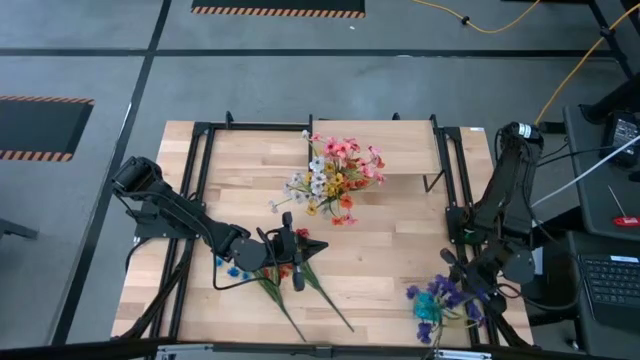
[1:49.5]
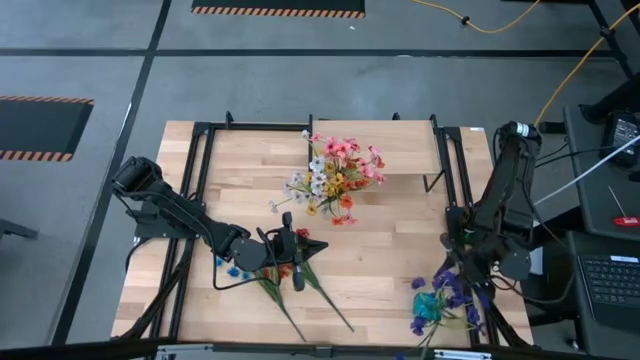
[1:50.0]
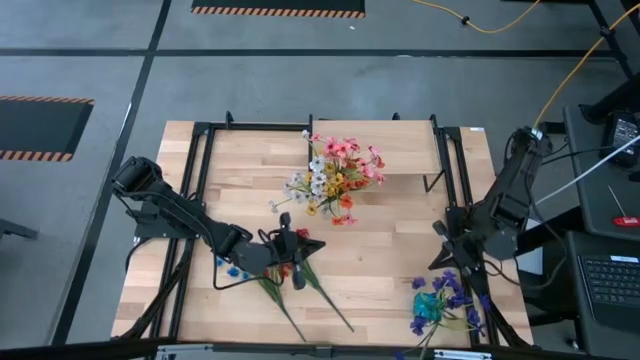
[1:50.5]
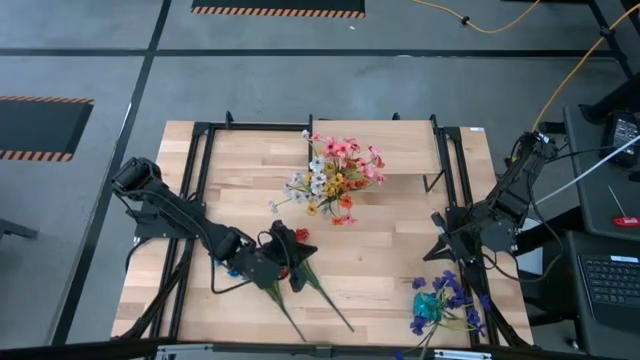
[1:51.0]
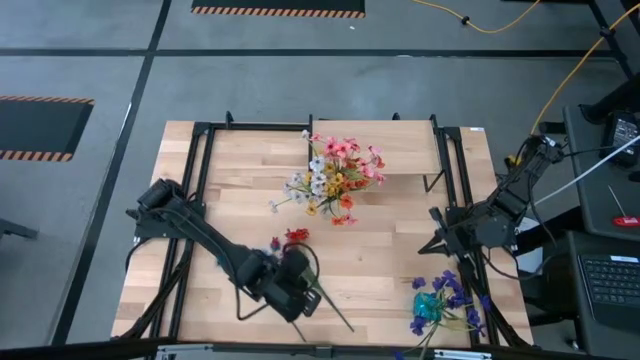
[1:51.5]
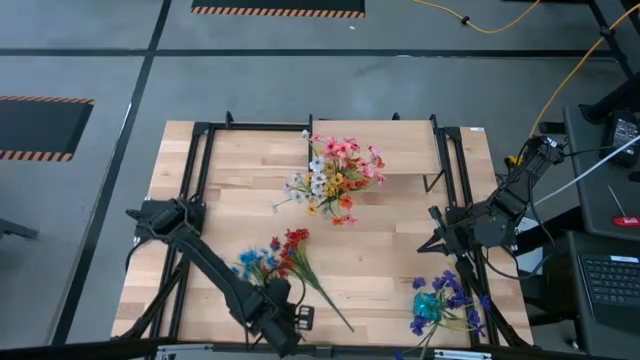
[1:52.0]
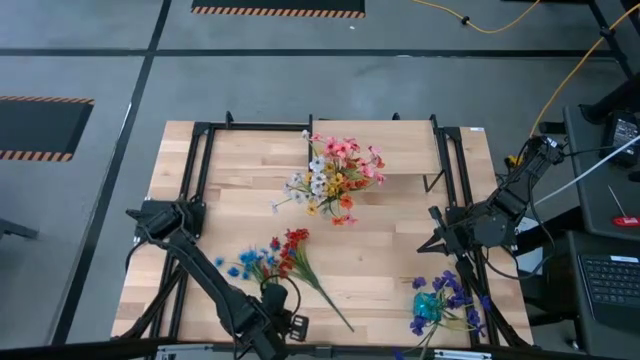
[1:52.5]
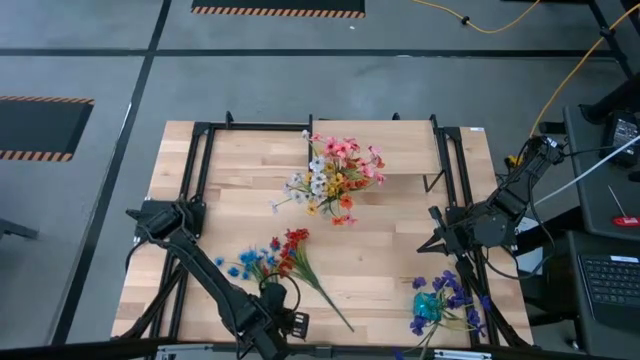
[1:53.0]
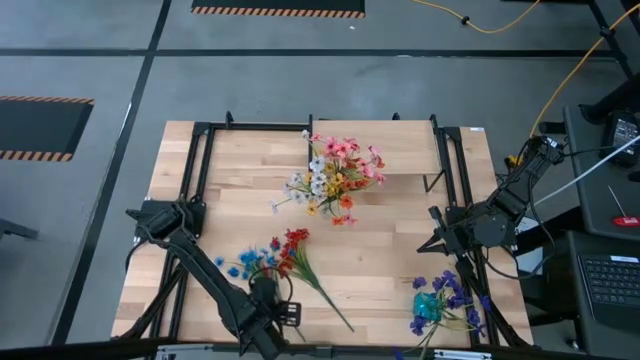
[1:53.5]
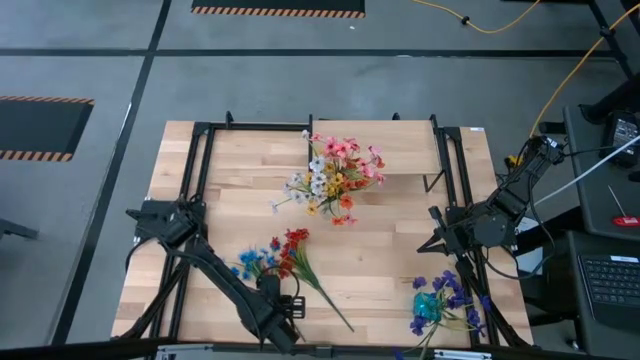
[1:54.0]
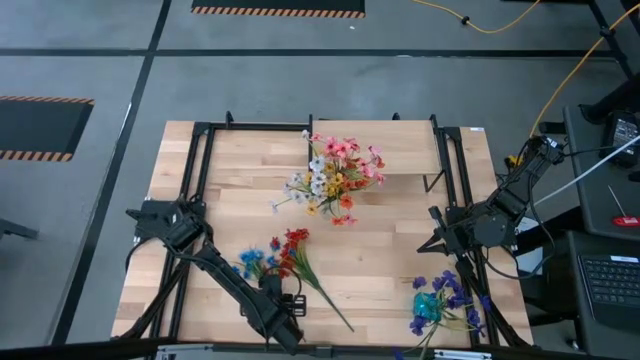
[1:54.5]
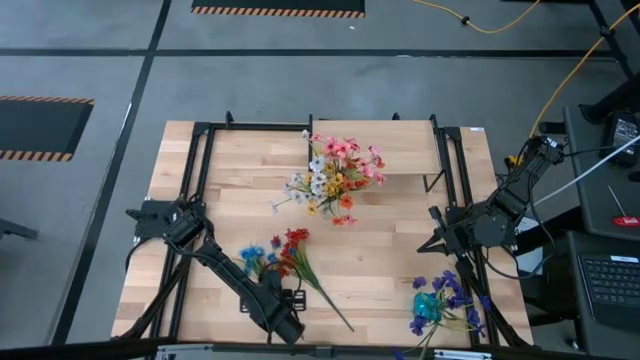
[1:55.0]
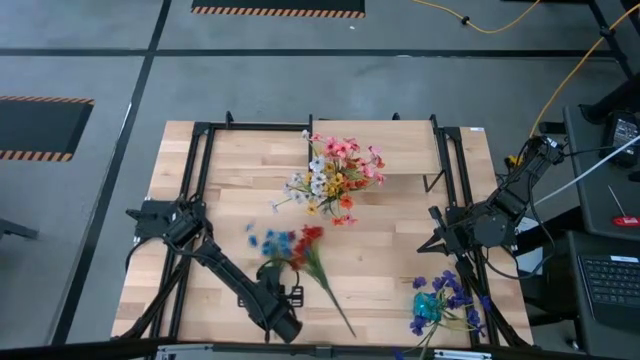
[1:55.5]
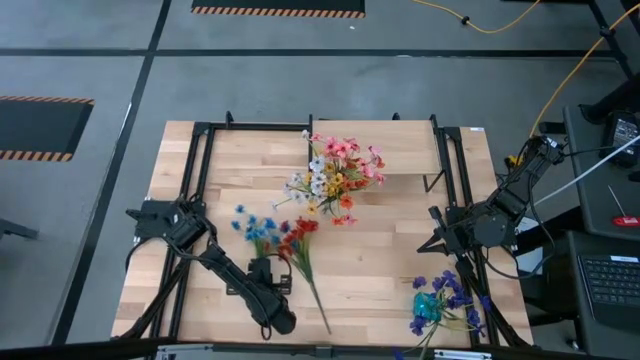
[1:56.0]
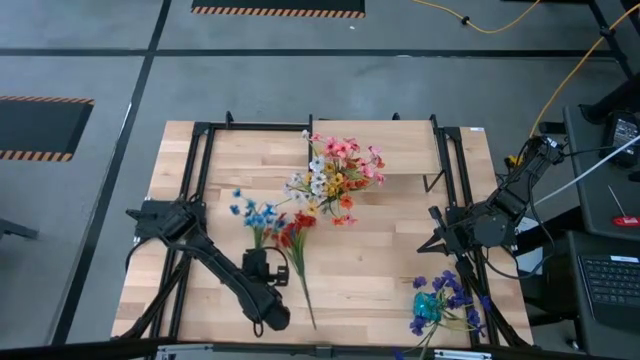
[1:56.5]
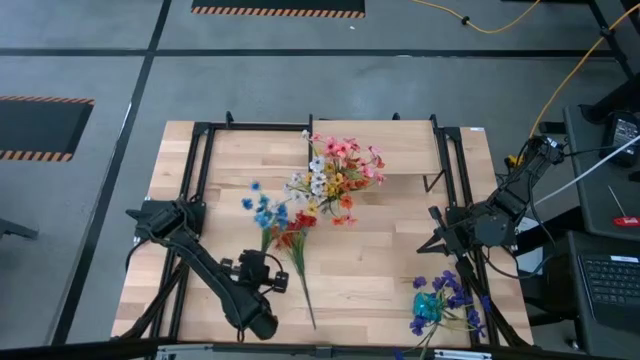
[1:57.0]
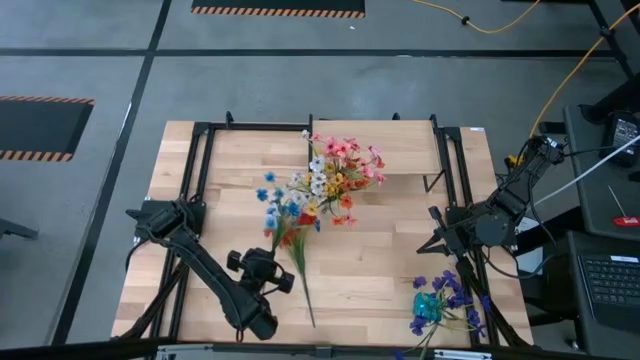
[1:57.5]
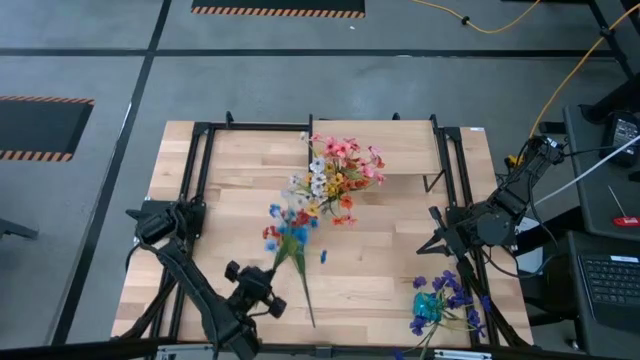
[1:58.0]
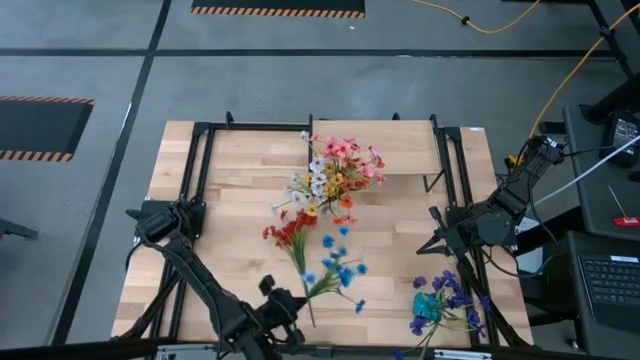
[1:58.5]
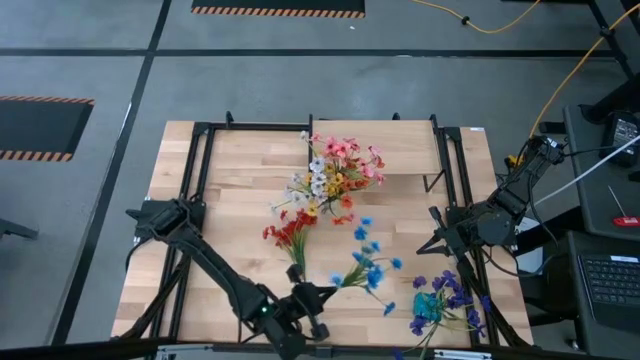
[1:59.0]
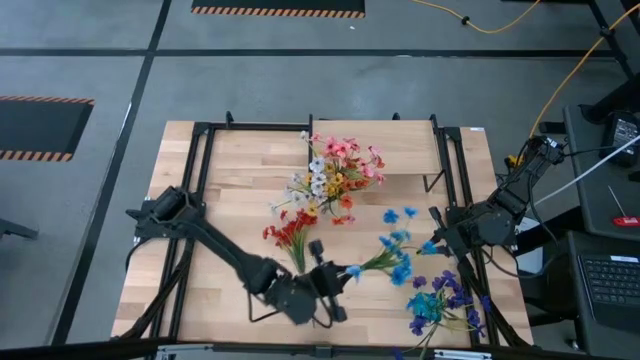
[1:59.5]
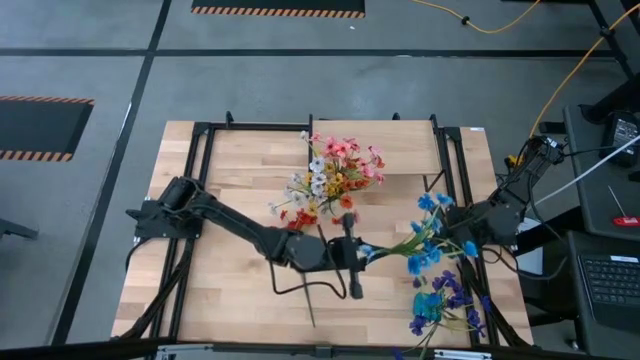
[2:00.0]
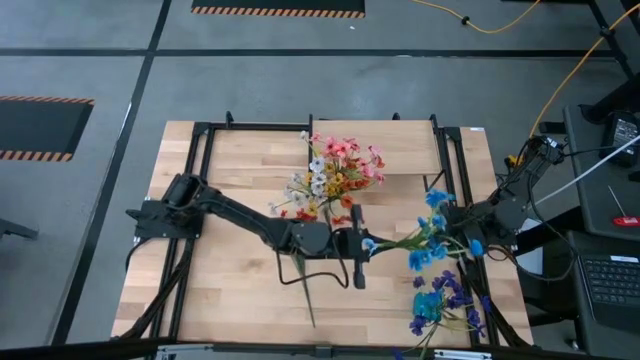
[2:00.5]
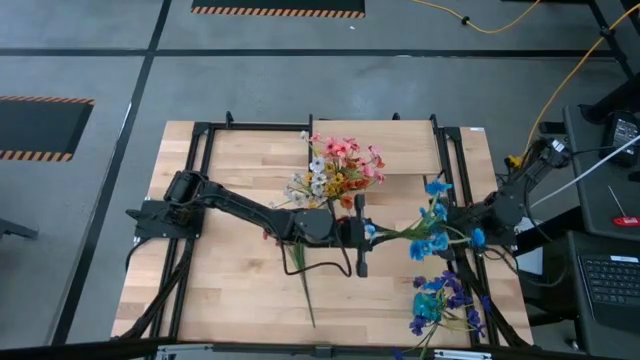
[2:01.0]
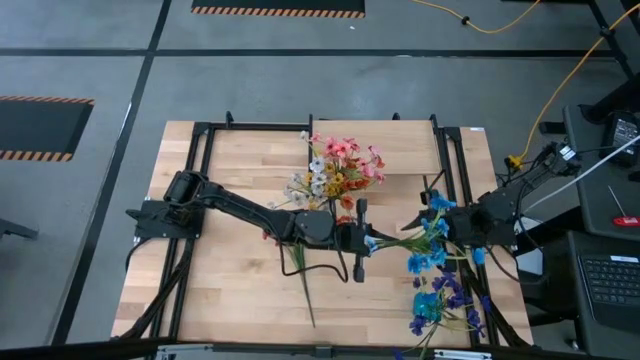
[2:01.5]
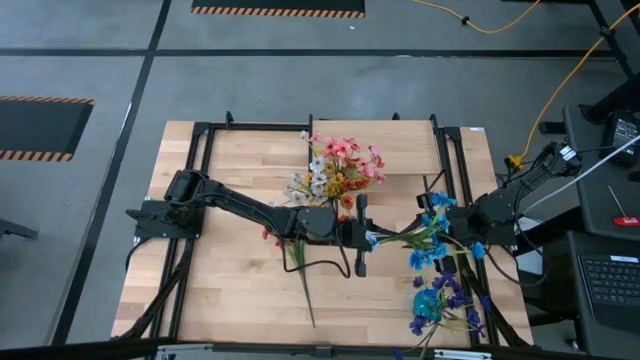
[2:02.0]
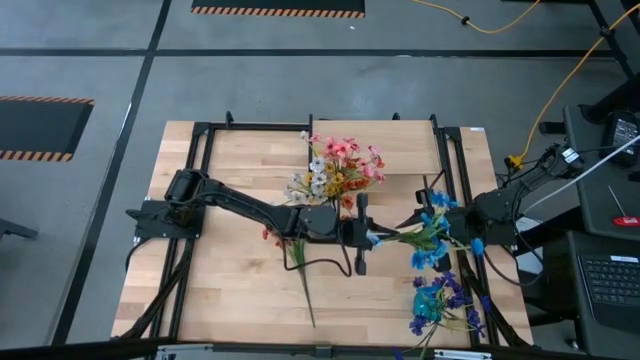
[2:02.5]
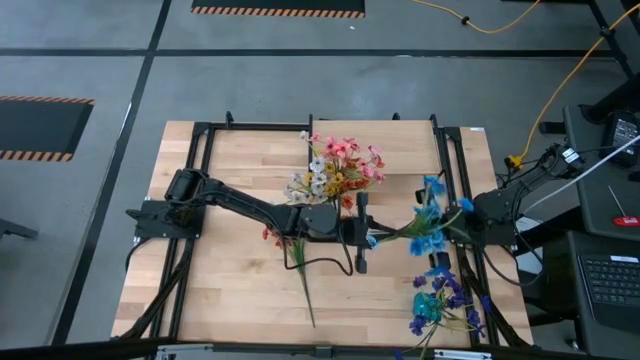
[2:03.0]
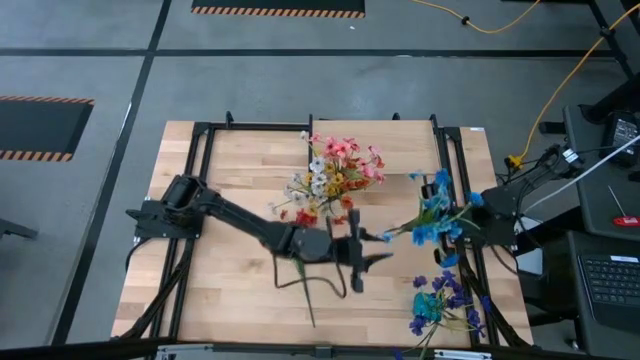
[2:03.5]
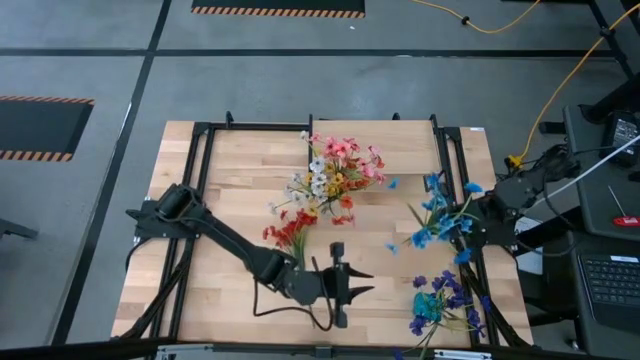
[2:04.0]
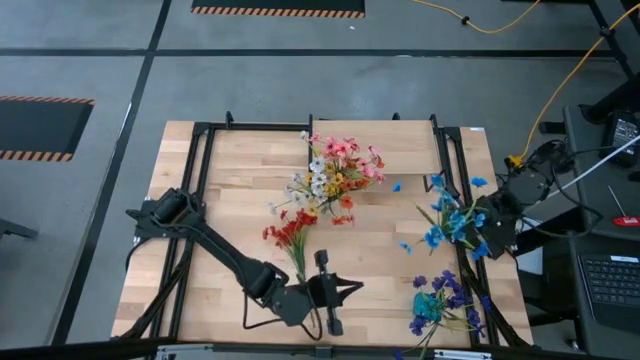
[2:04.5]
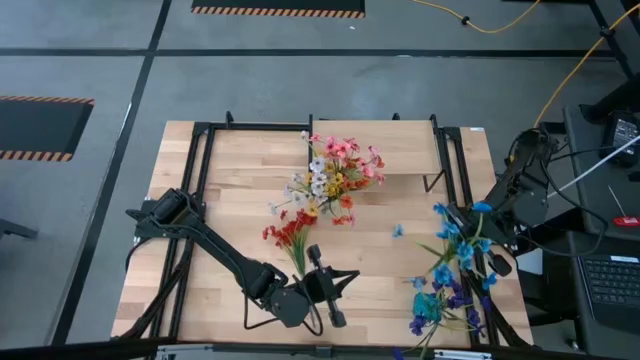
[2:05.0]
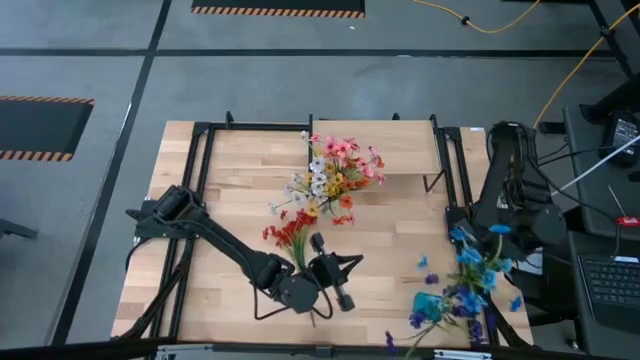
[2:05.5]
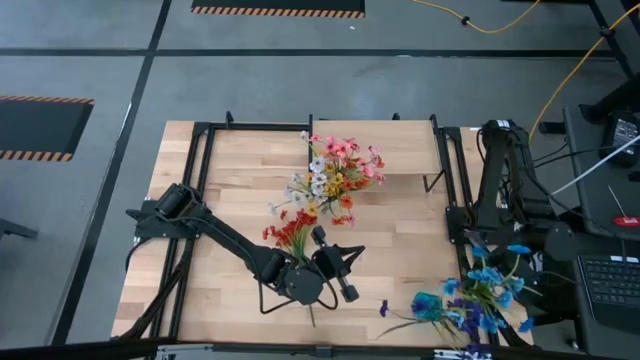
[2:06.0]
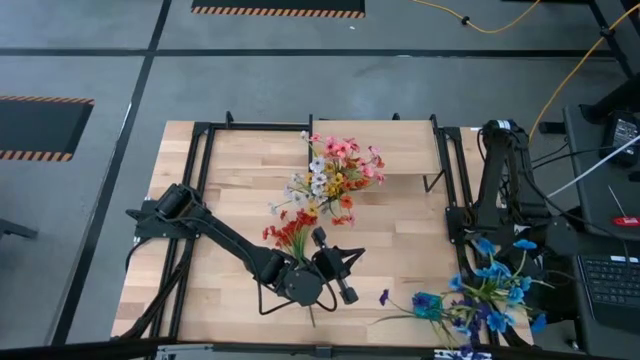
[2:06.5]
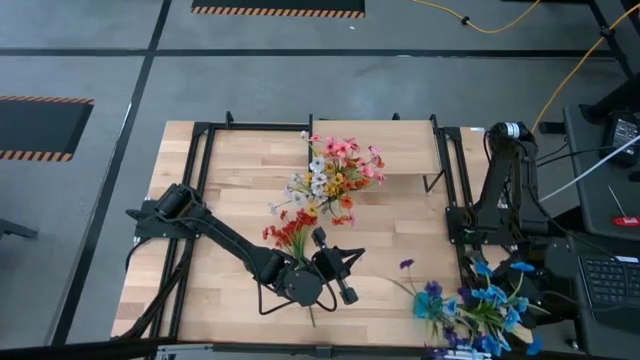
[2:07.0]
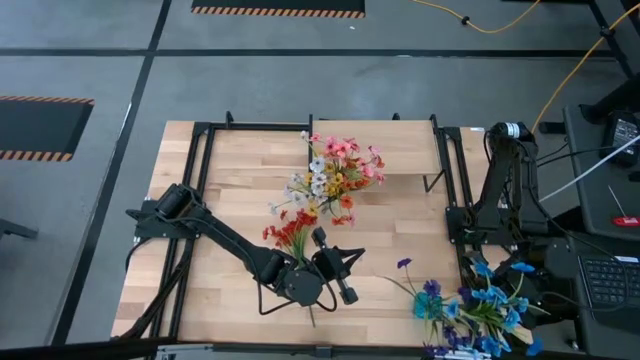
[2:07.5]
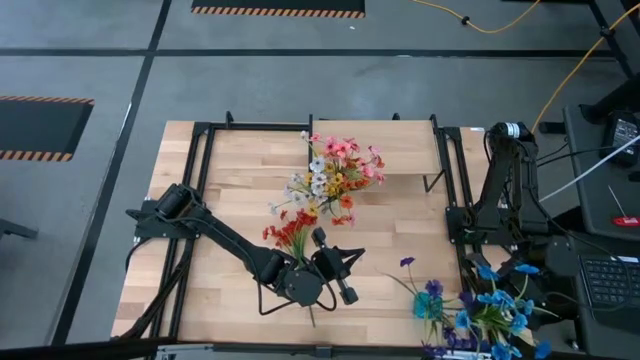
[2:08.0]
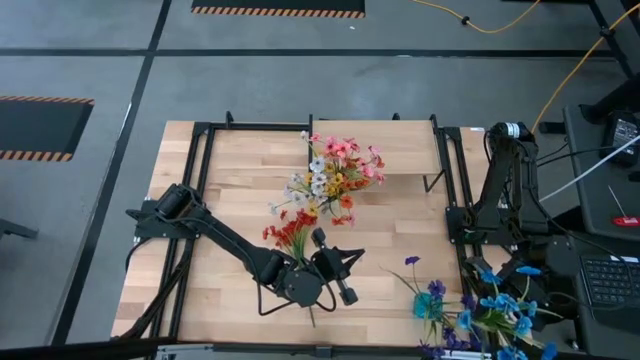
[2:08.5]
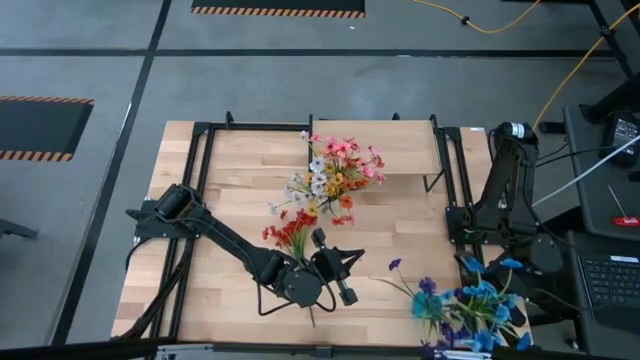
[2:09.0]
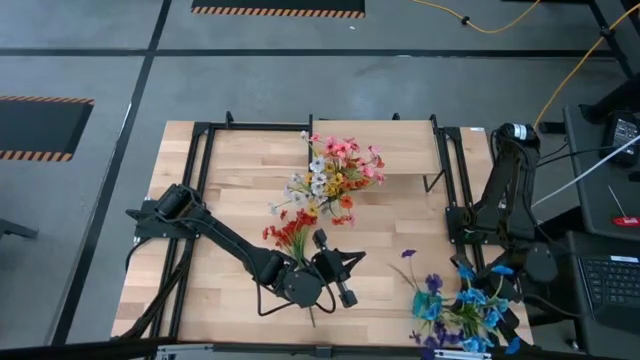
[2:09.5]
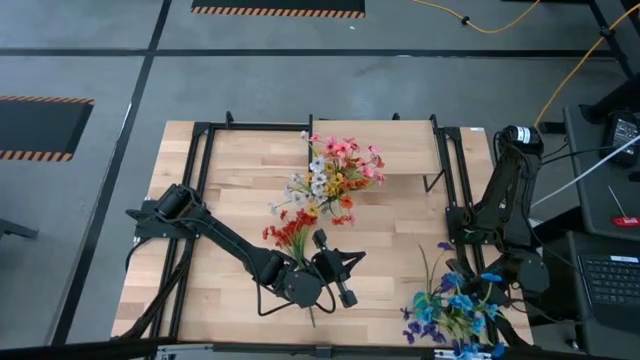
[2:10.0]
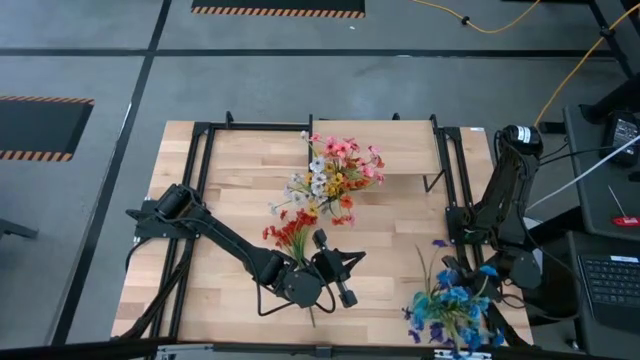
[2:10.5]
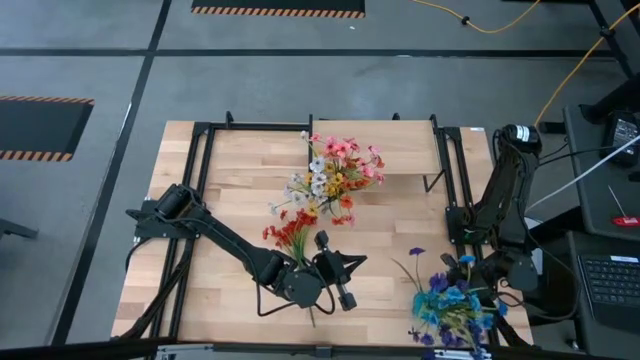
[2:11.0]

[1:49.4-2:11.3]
Task: Pick and place flowers into a vace then onto a shelf
Put the blue flowers into the blue vase
